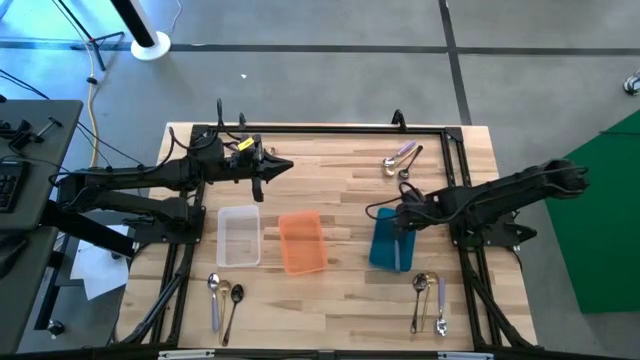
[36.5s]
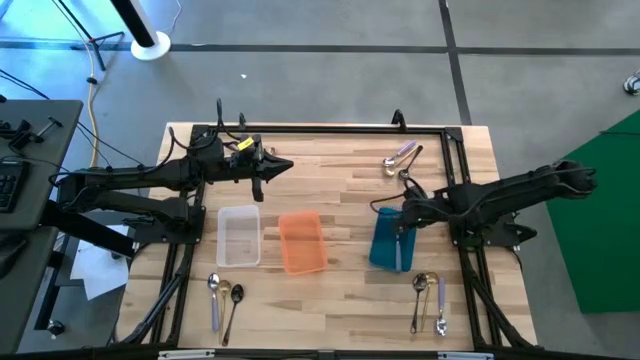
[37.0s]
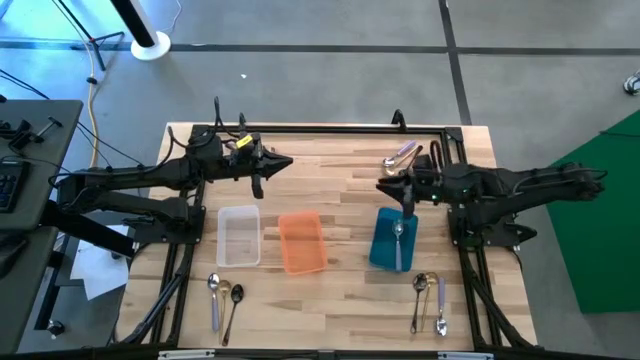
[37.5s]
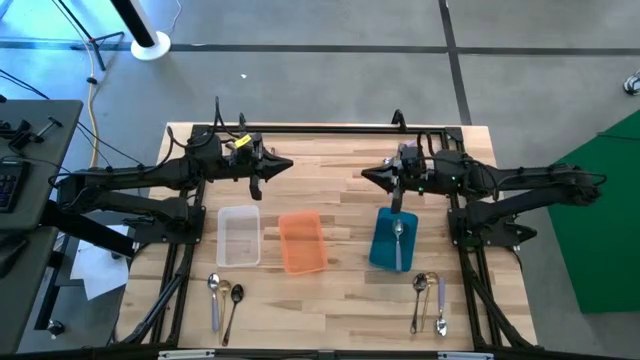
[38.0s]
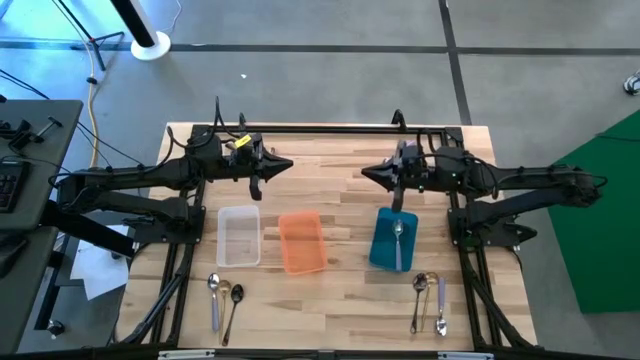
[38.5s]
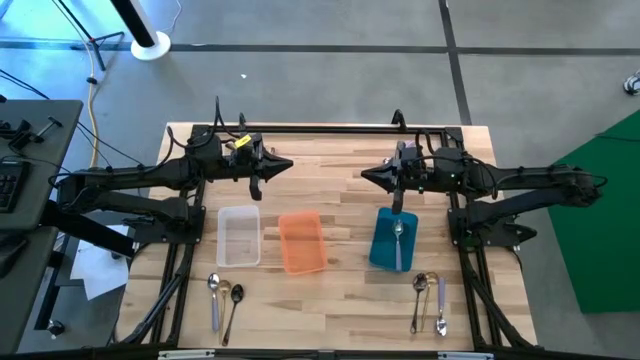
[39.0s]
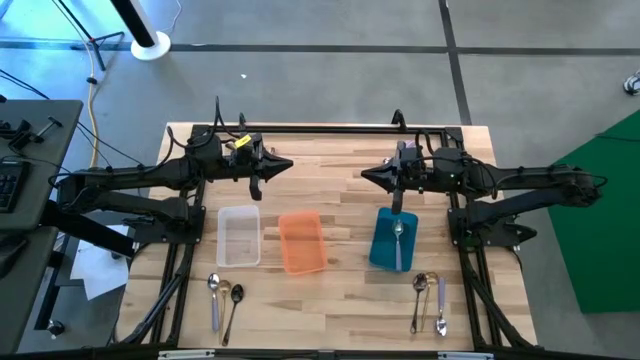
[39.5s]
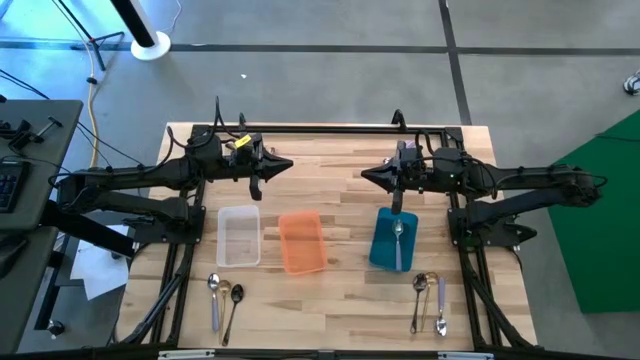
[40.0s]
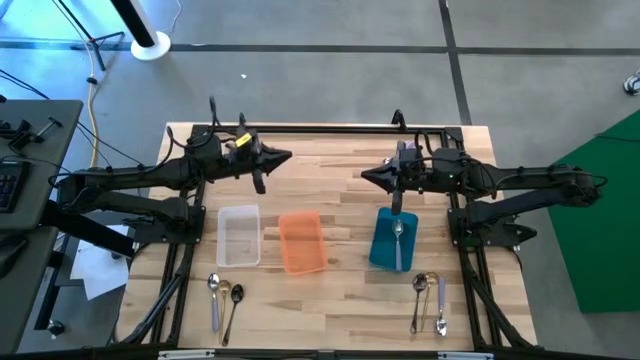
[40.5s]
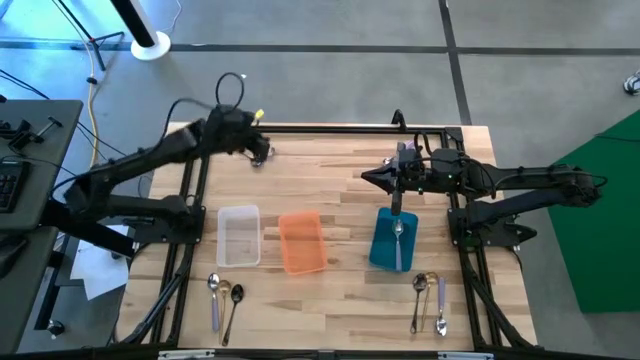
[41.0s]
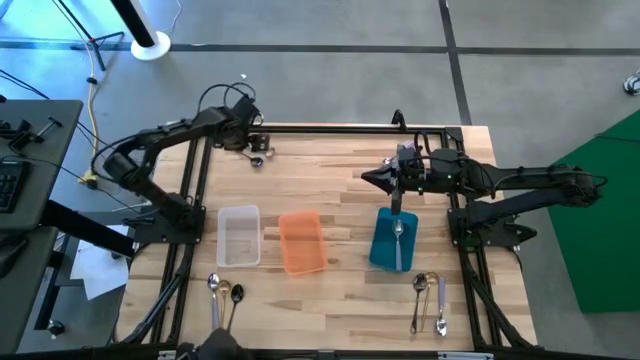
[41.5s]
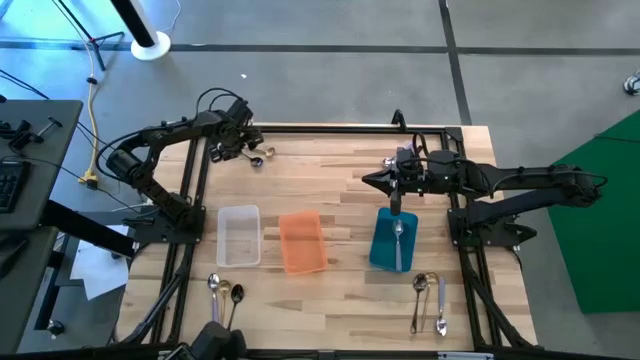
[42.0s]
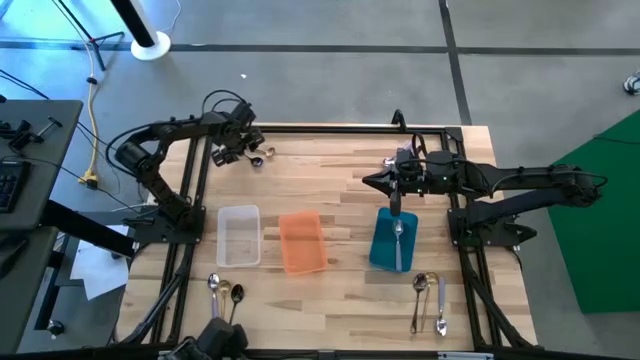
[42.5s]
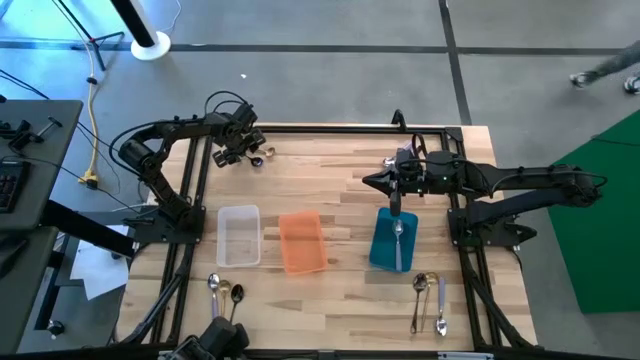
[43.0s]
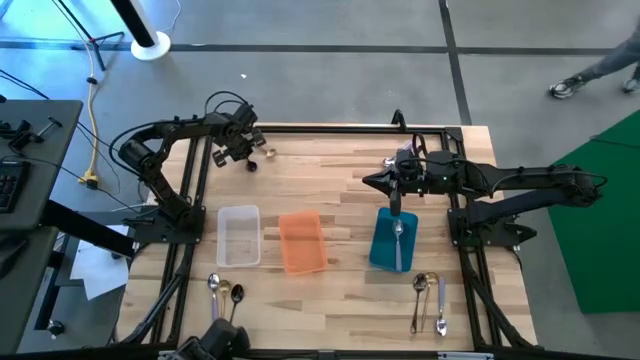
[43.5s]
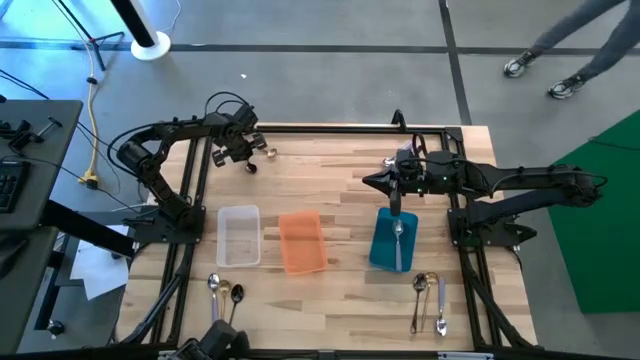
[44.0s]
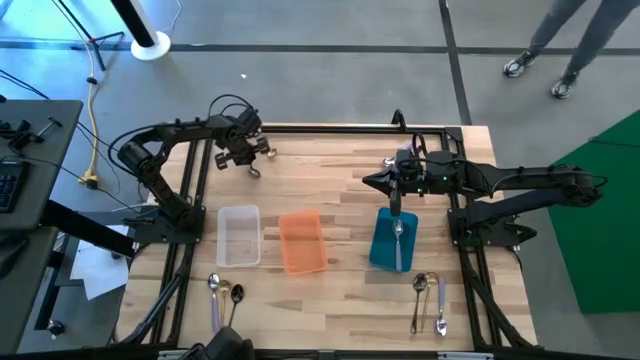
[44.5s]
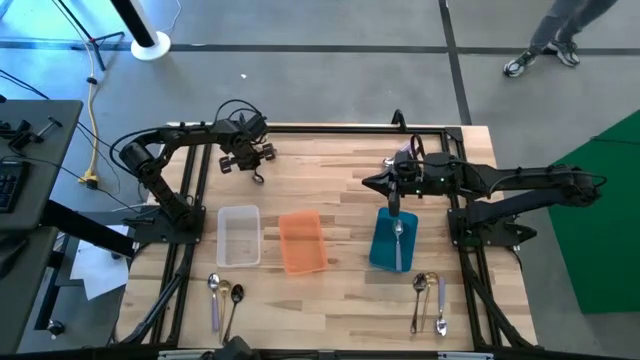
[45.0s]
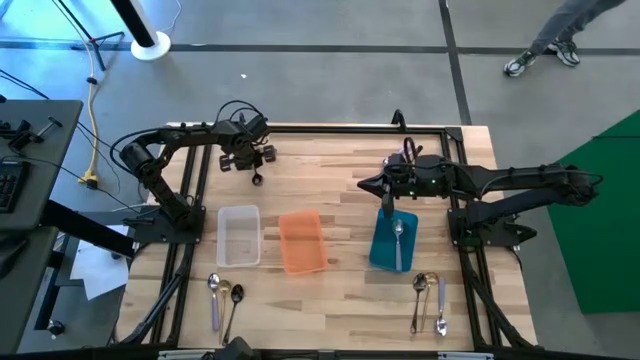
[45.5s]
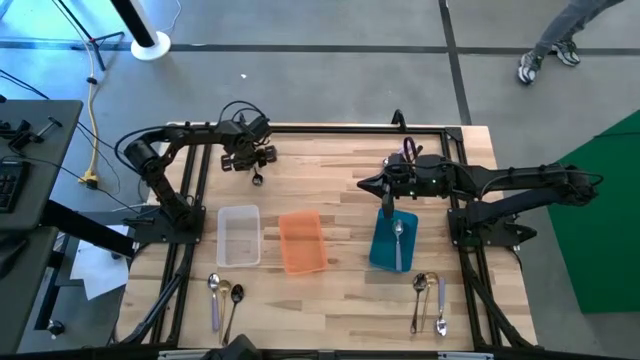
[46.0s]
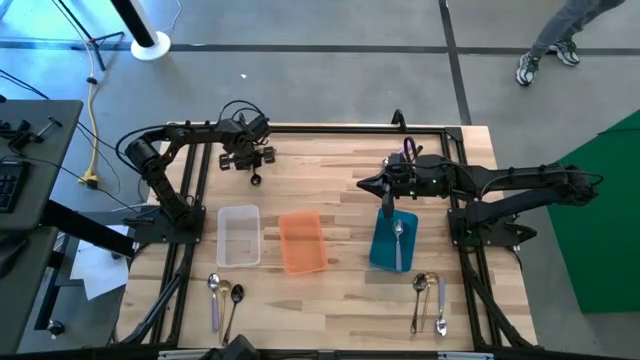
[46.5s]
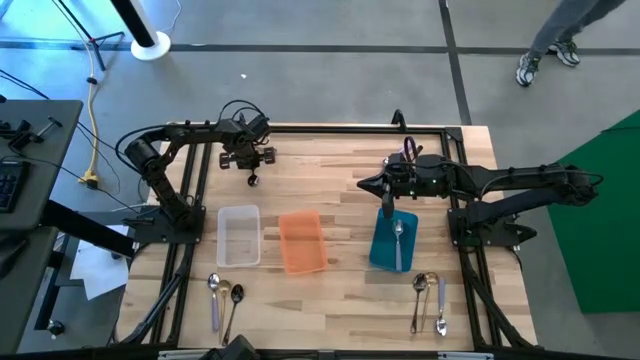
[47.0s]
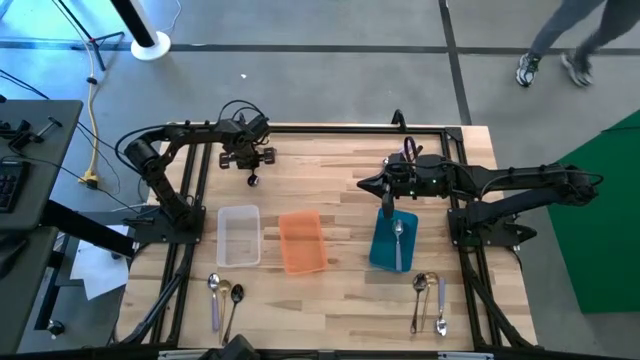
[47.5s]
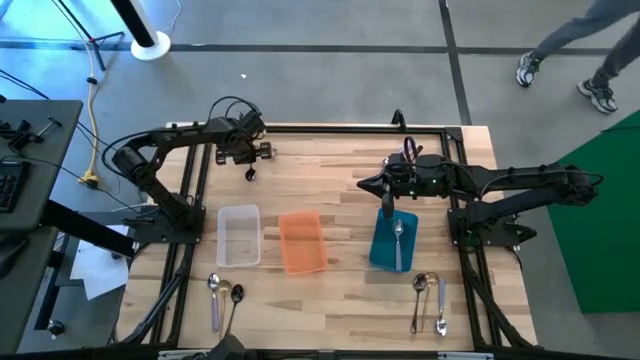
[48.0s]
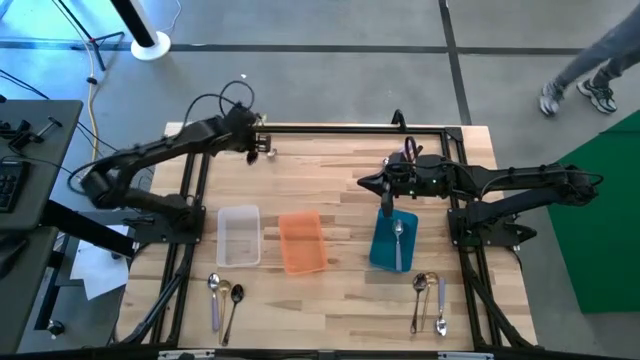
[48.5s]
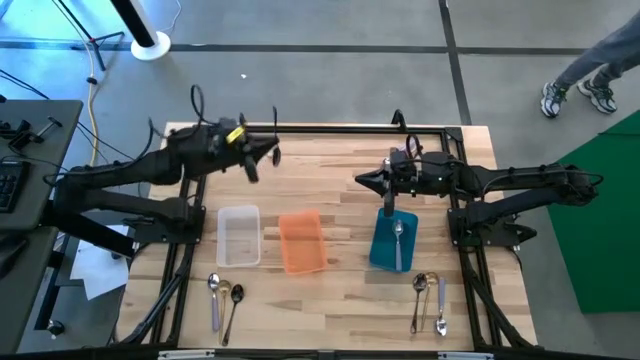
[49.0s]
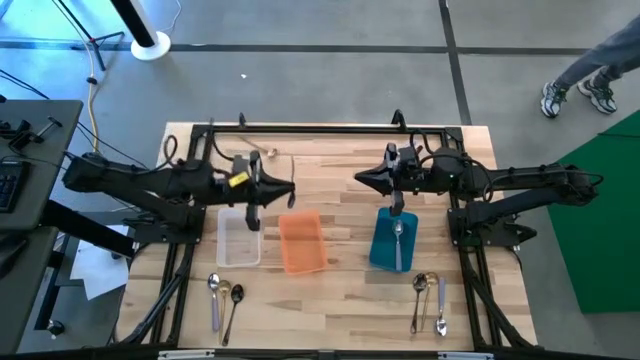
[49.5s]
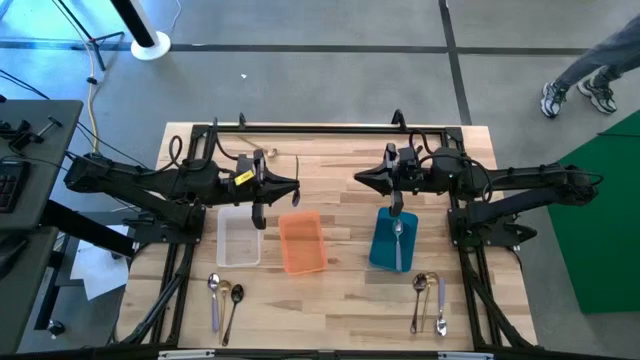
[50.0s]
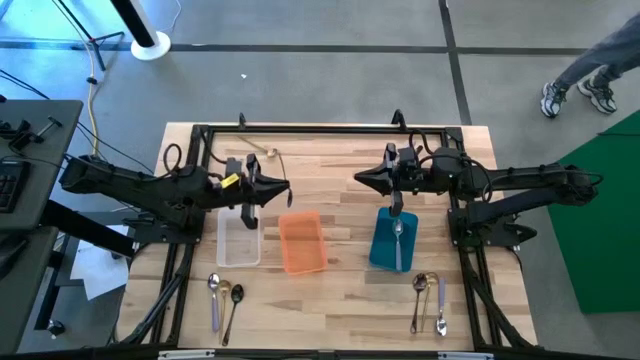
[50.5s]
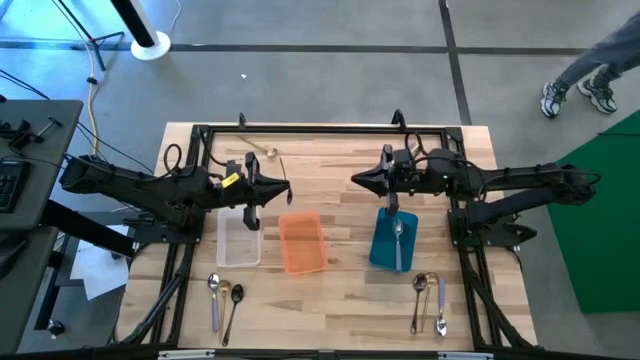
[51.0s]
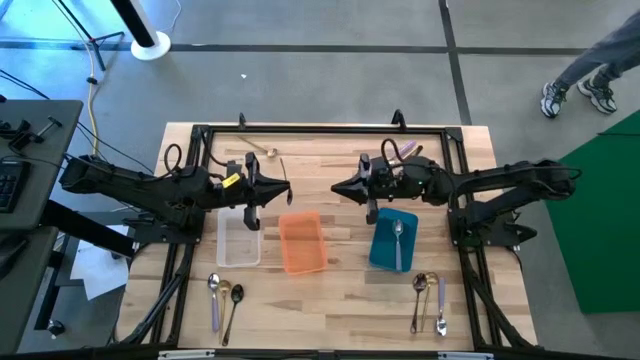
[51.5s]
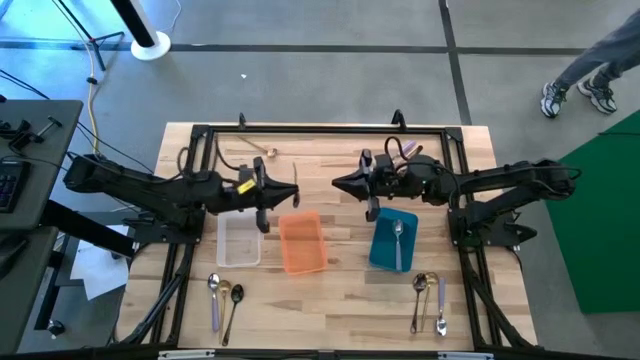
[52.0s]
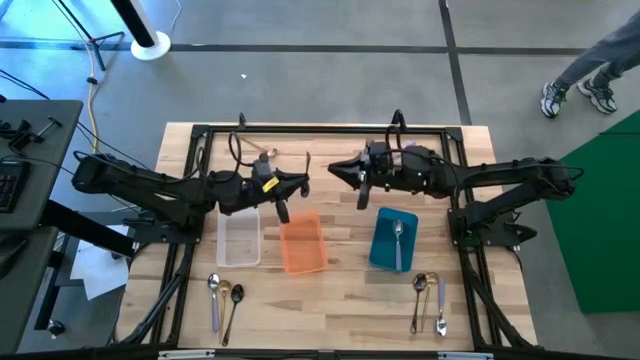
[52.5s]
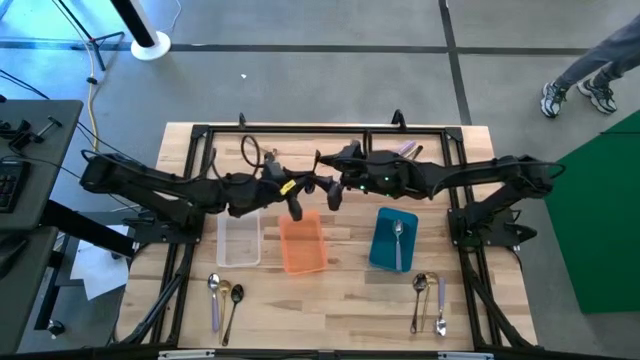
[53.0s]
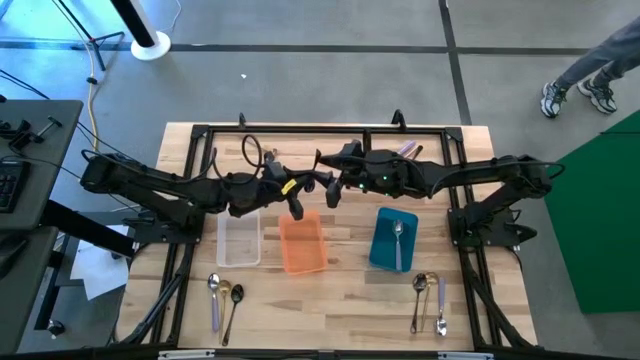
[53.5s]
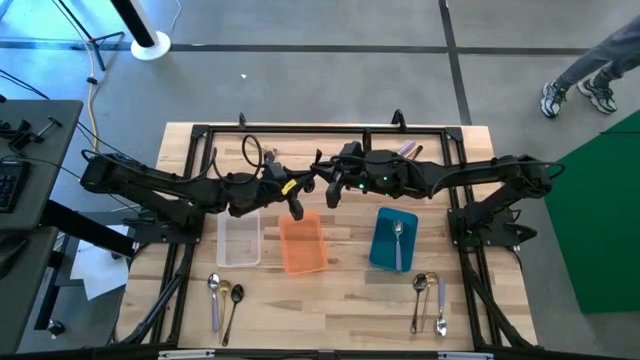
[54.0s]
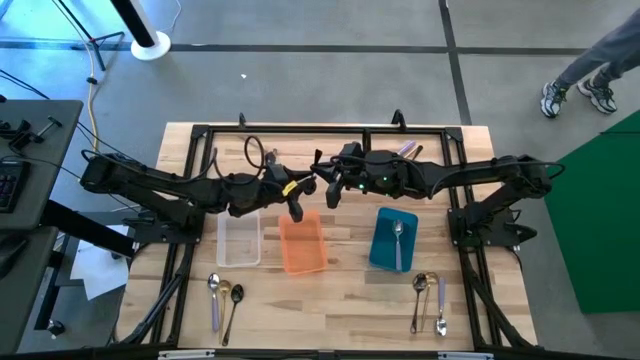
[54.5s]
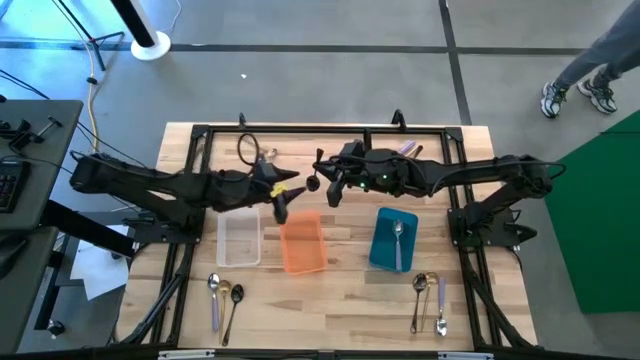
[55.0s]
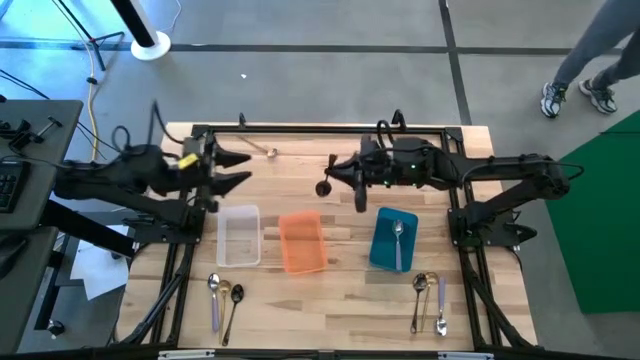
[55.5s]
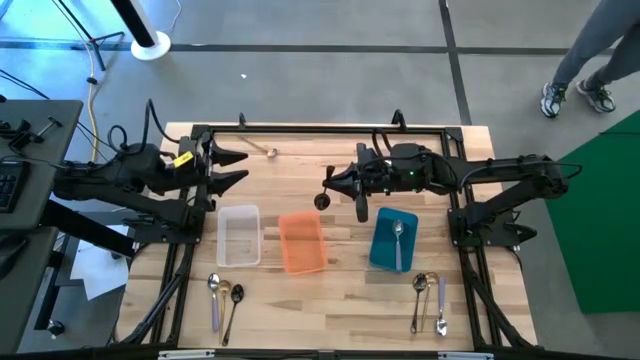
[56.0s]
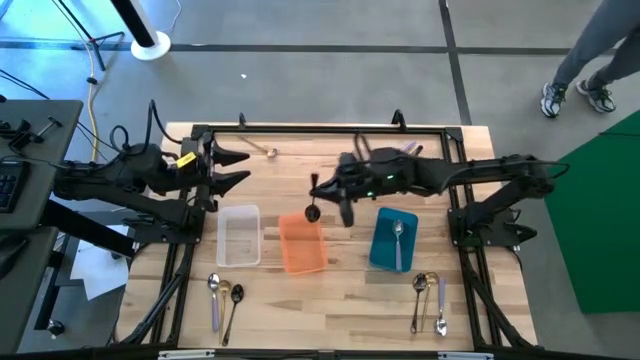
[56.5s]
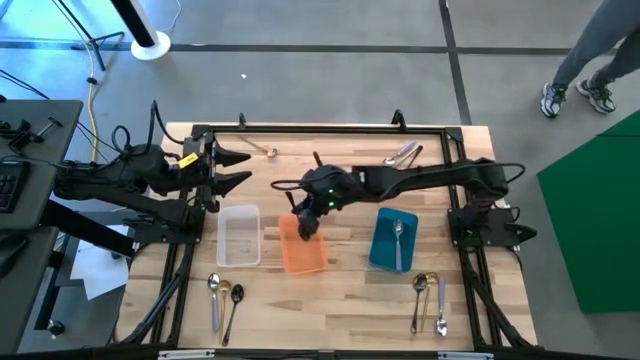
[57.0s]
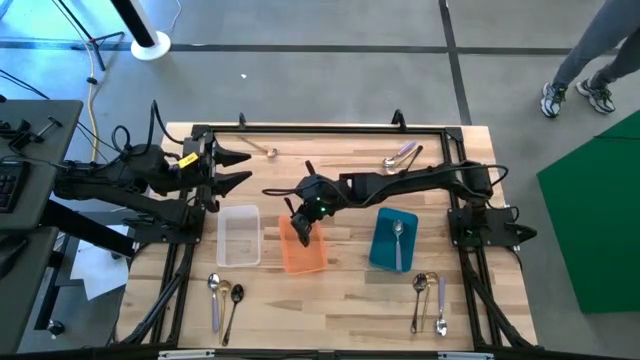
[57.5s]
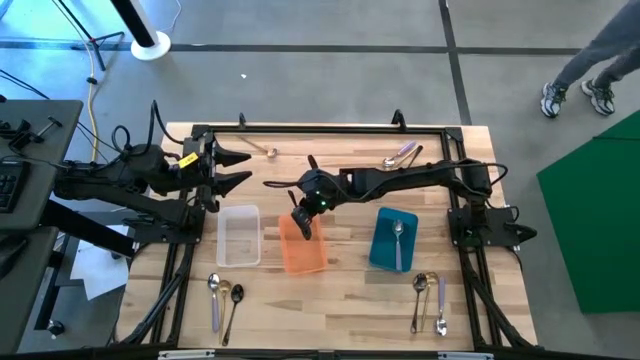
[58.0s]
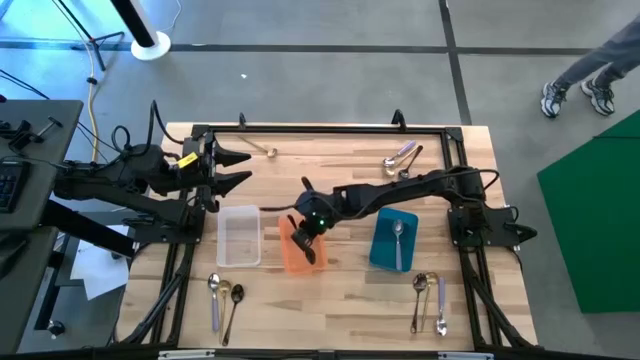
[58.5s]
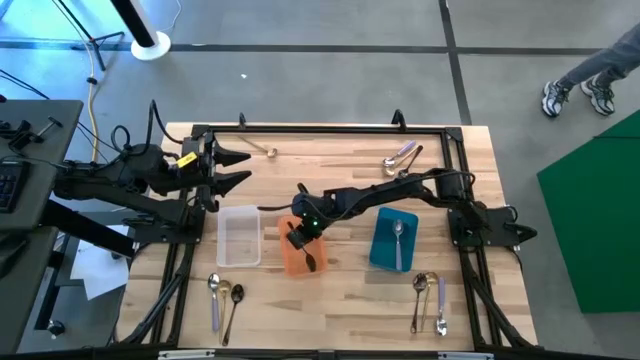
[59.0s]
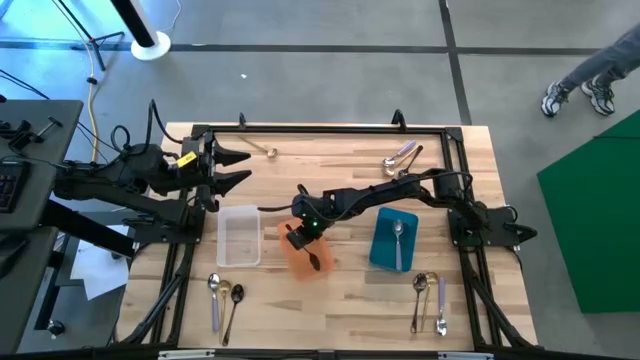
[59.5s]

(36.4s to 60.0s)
Task: Sort silverware by color (type)
Put the top left black spoon into the orange bin
